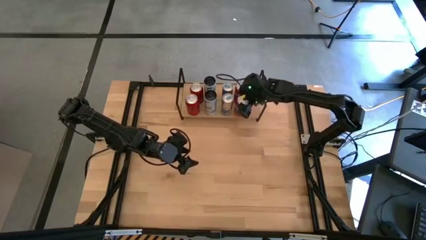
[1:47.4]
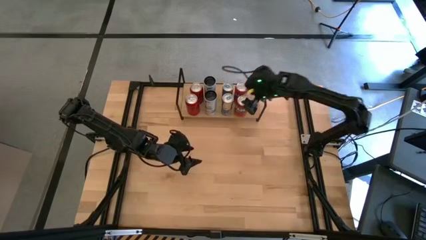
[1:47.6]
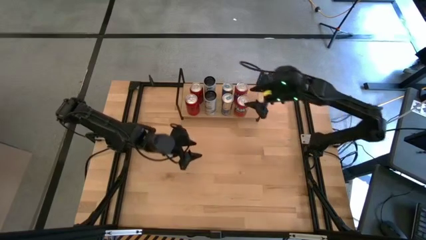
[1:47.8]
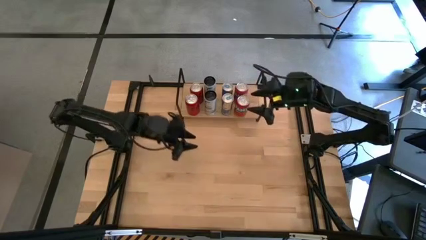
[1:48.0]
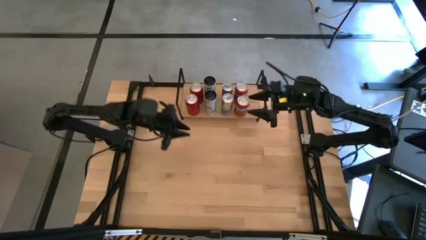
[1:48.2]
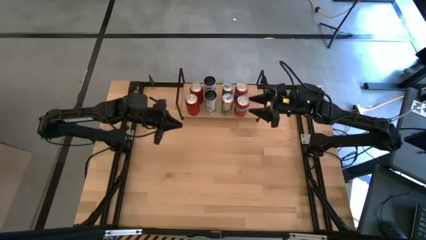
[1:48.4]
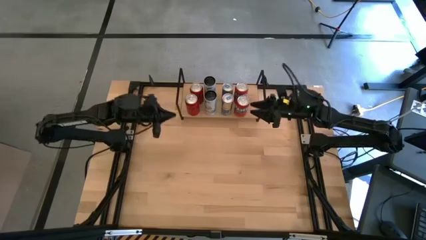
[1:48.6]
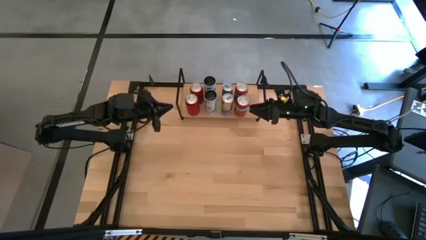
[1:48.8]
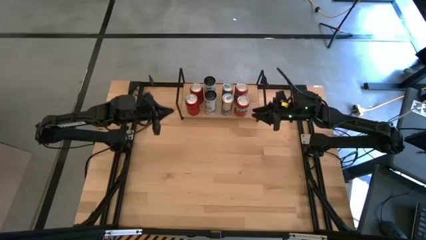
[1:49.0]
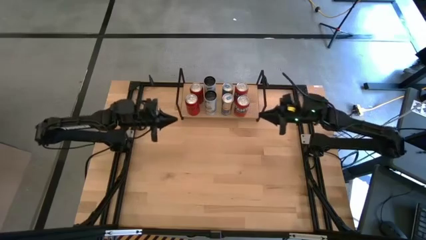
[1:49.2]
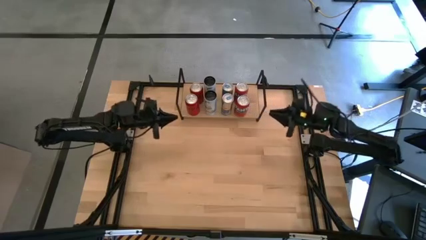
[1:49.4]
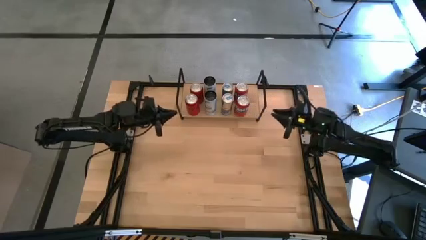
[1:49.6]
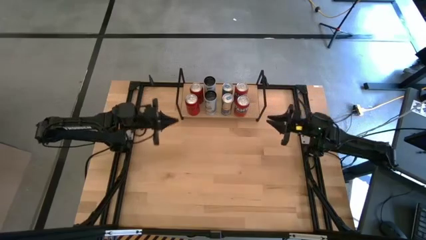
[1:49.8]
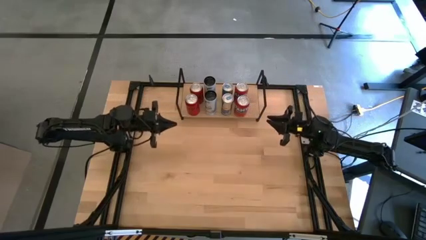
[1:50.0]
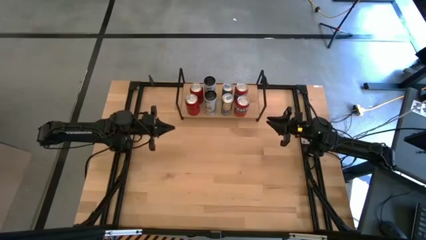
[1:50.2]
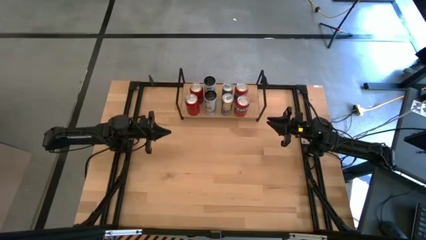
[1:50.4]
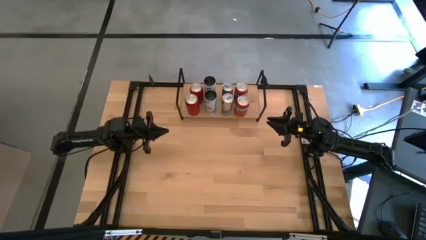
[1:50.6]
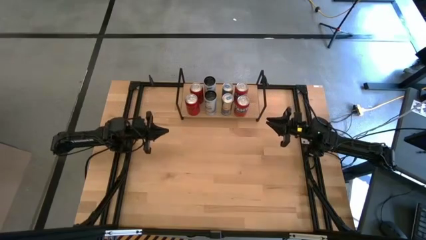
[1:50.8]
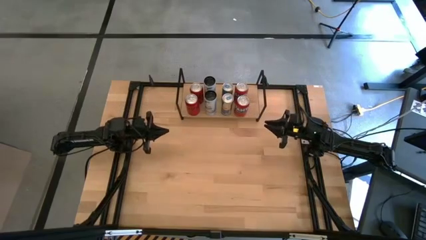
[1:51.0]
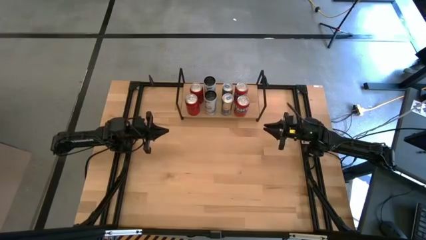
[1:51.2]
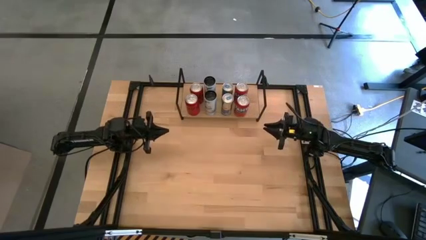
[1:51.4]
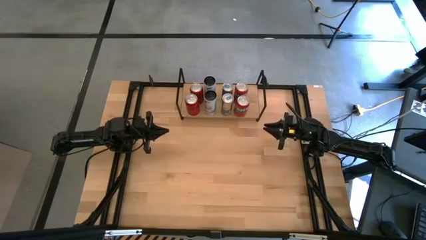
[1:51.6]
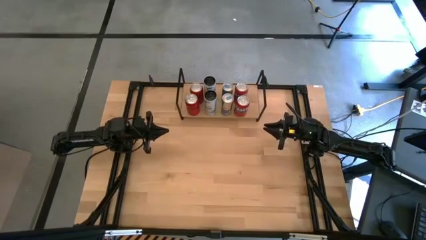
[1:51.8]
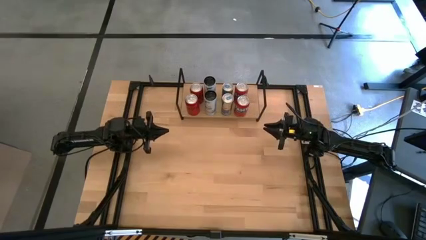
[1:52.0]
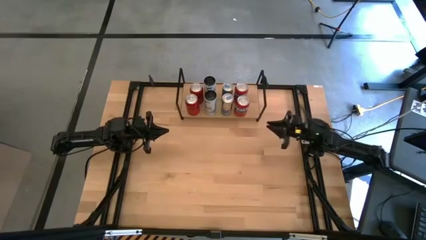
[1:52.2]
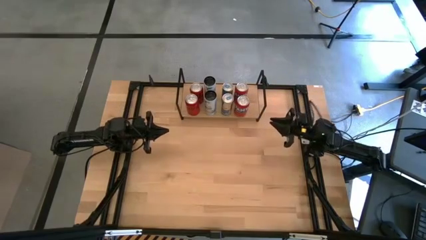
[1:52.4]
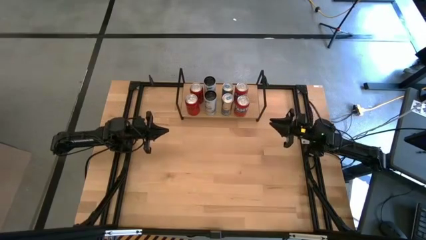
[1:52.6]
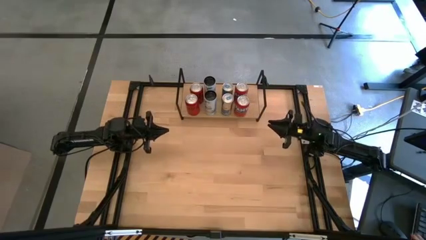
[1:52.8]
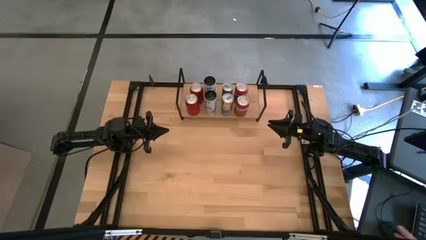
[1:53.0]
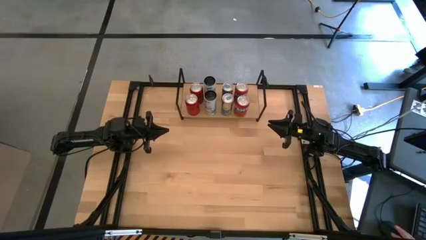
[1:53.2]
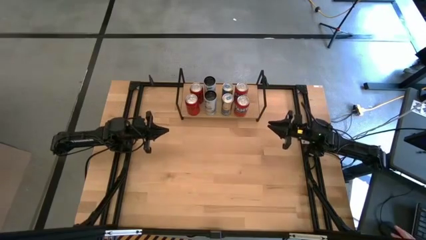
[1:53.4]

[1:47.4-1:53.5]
Task: Place canned beverage on shelf
Return to Home Position

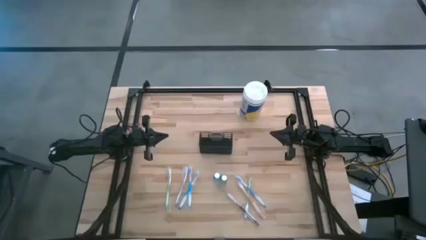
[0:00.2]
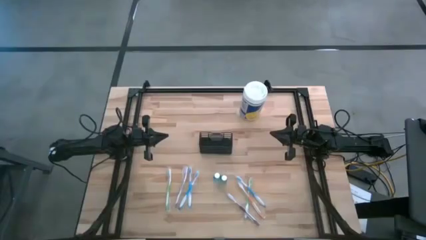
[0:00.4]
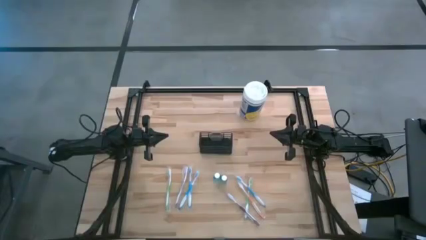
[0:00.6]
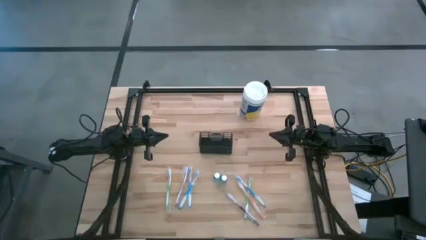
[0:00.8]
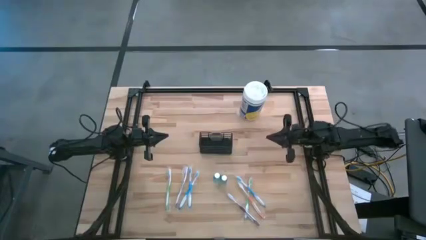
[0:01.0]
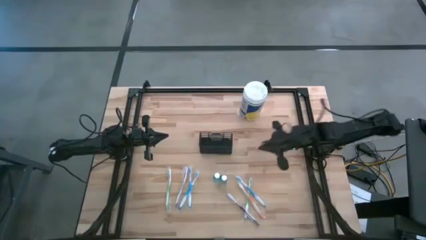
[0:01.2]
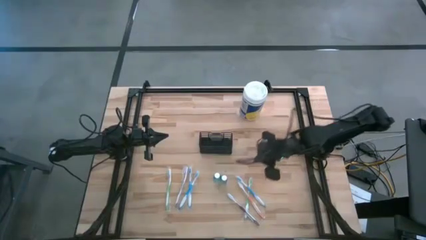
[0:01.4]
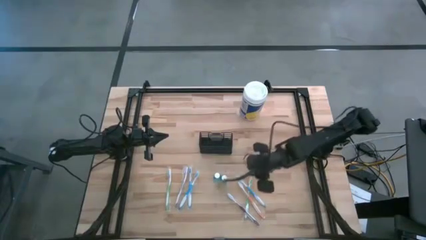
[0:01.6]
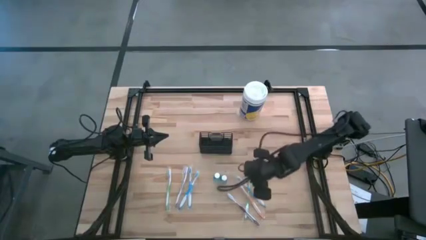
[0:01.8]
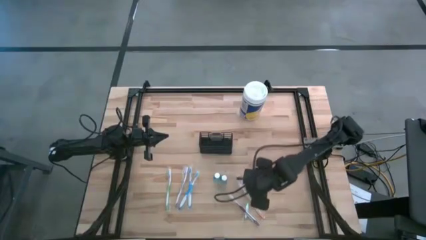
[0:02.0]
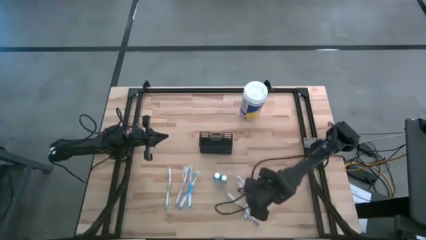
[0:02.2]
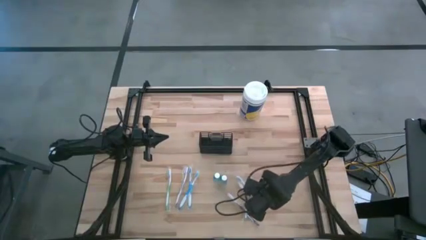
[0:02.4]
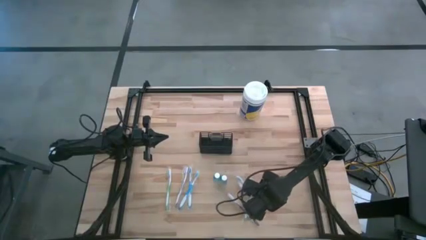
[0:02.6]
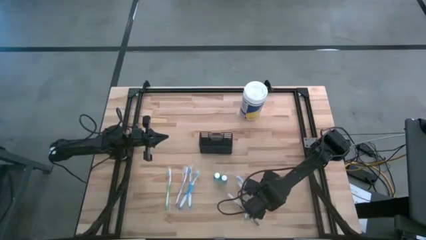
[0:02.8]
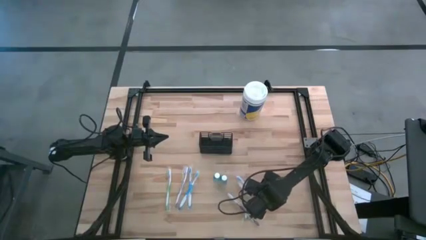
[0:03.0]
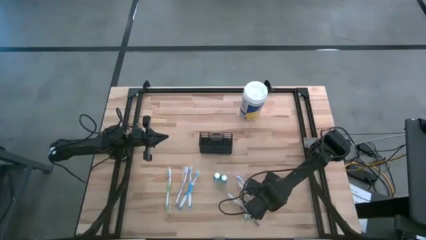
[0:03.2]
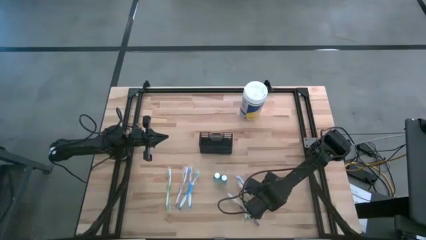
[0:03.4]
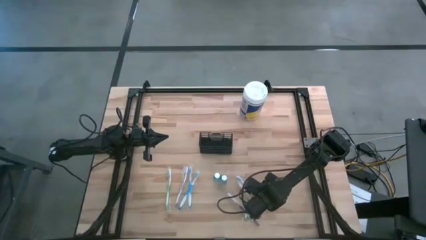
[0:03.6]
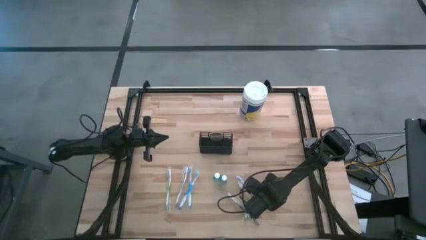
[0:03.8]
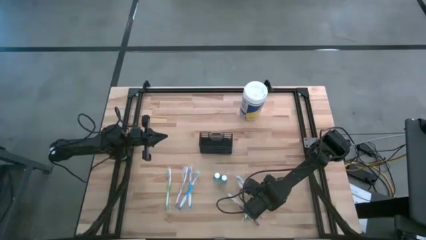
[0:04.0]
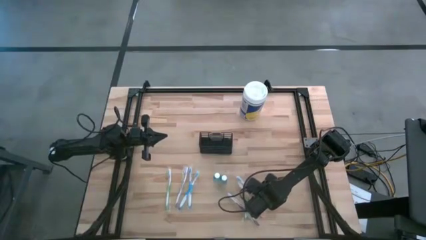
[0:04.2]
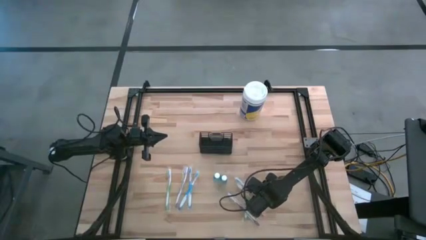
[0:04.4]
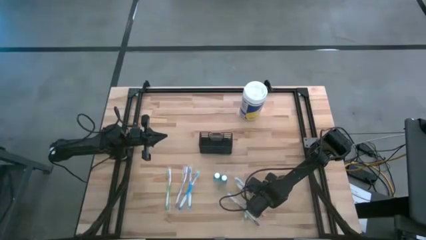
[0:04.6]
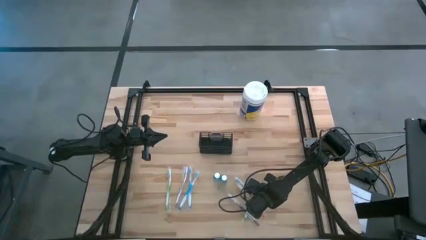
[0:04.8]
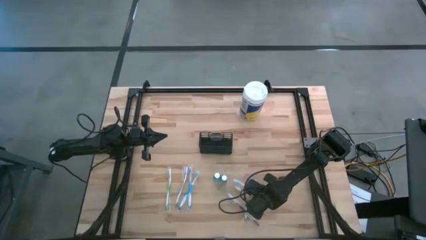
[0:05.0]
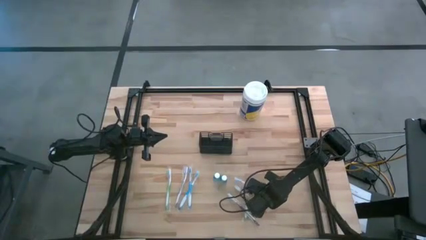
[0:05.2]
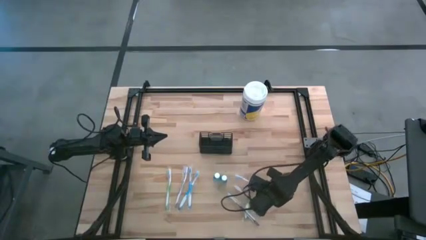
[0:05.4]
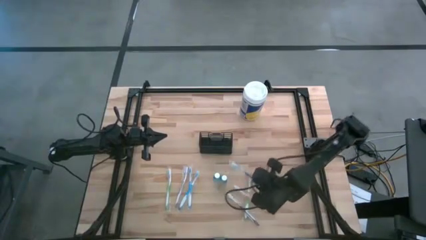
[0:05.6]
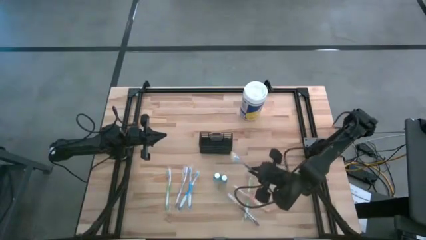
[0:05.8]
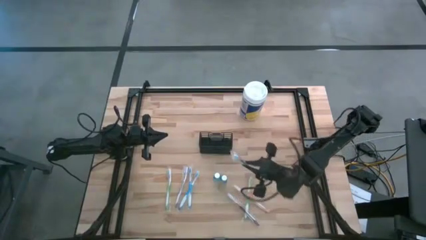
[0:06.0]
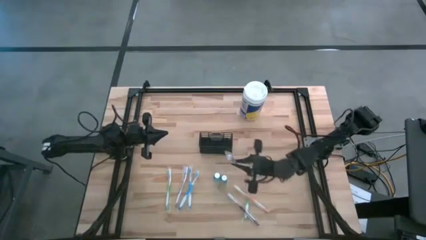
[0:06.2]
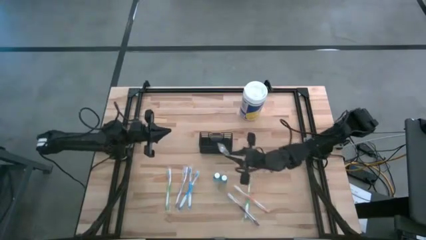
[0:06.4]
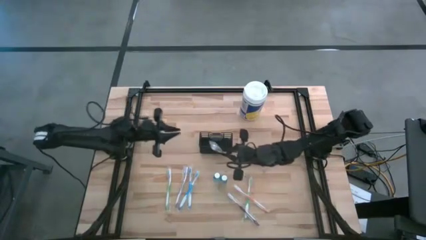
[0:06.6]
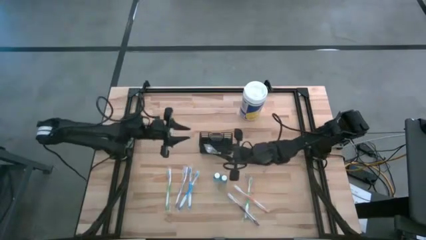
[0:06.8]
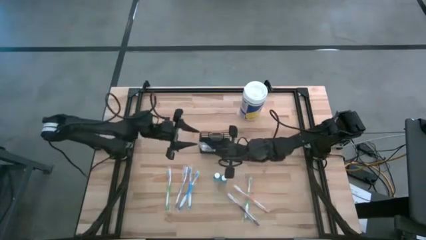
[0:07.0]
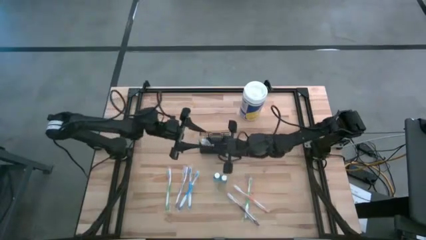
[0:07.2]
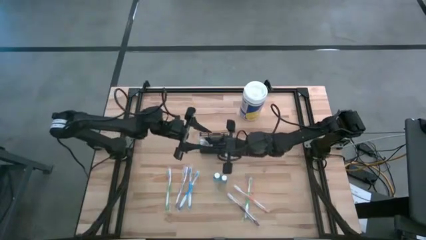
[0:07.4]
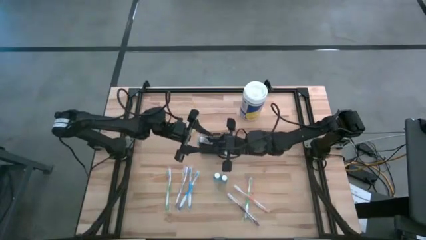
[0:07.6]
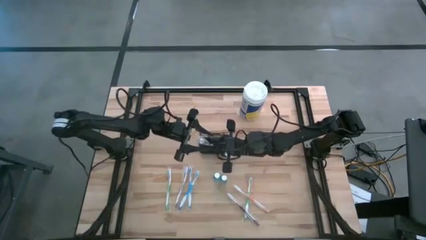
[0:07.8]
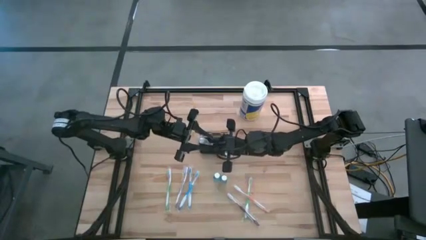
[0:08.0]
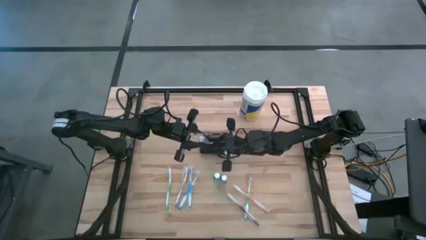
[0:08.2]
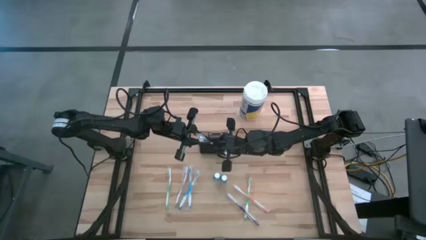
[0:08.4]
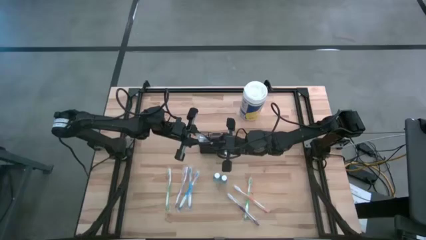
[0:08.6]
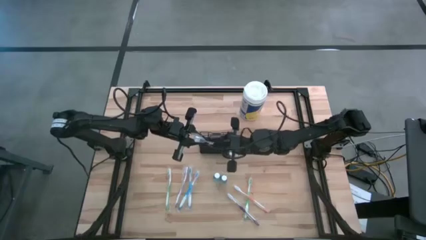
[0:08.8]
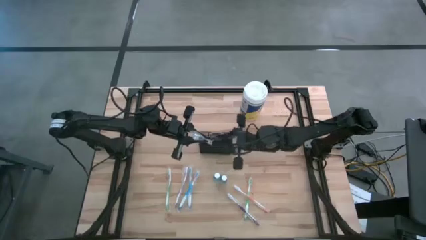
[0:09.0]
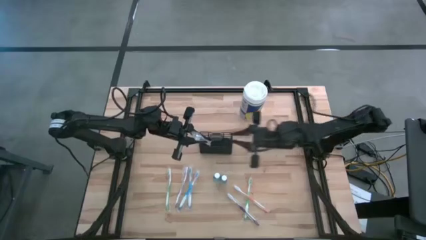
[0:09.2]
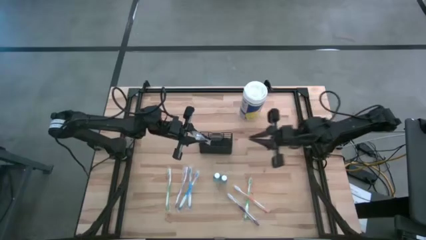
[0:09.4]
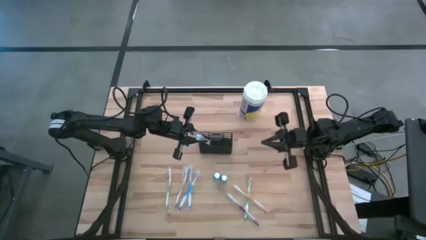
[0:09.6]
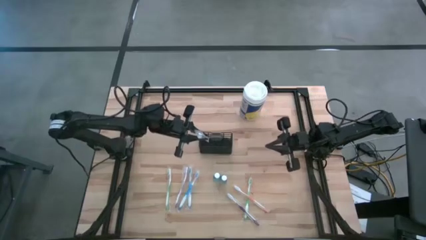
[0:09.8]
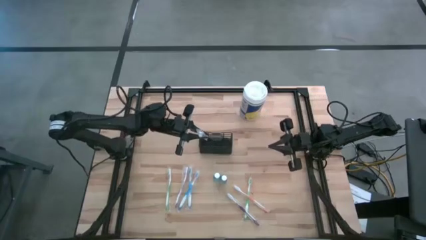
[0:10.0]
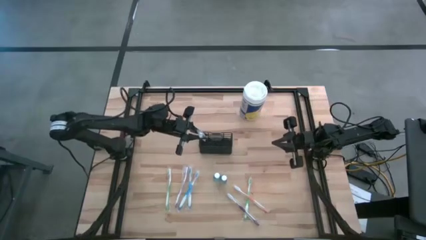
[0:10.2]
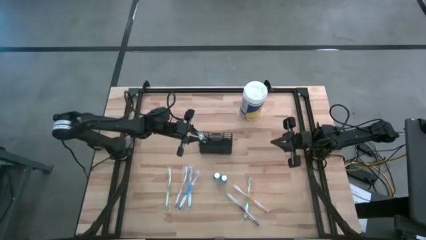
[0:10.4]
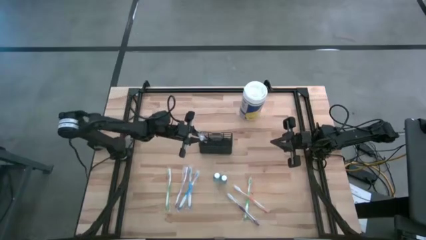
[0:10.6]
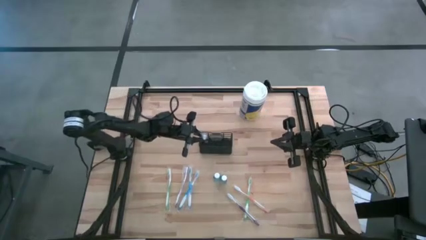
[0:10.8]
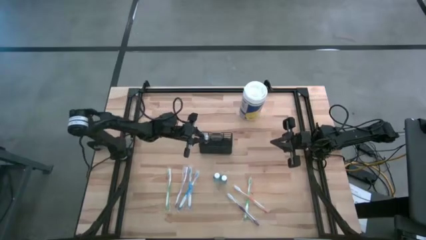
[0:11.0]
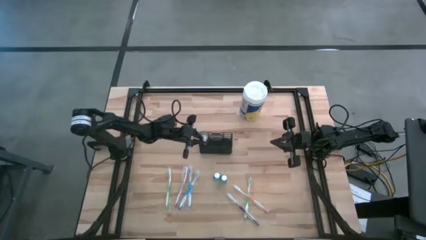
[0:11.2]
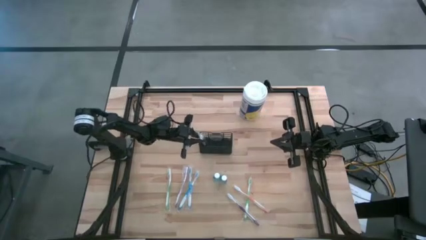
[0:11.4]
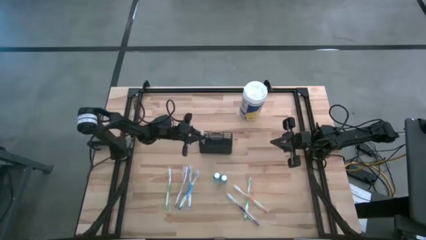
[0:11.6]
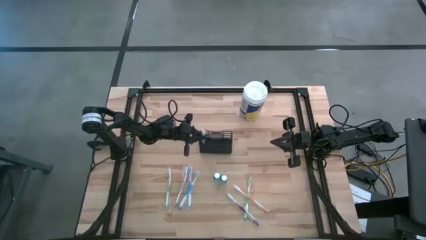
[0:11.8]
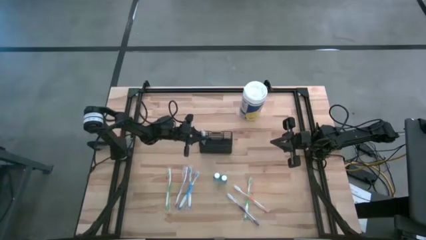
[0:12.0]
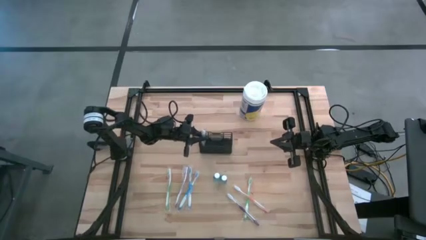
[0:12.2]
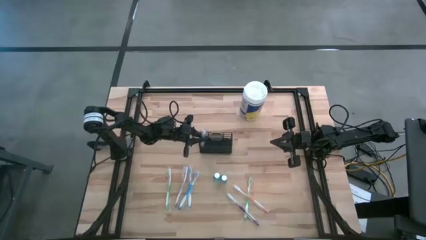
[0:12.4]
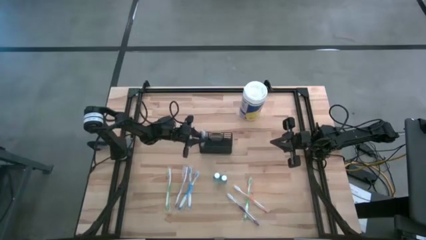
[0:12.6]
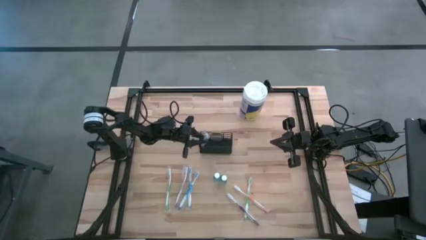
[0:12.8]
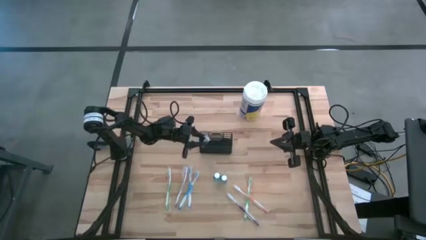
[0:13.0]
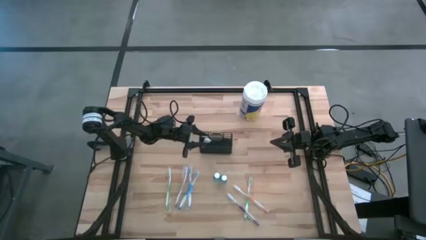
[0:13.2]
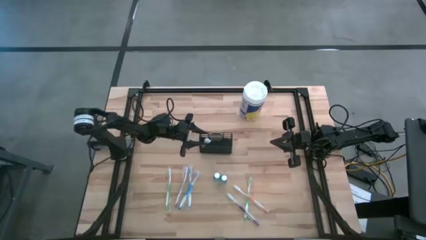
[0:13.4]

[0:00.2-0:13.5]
Task: Pick & Place toothbrushing station
Put the blue toothbrush into the black wire organizer
